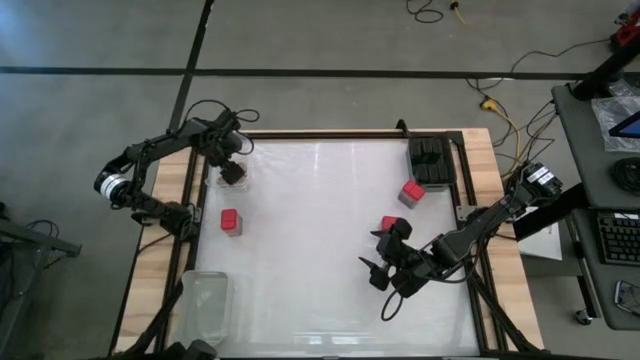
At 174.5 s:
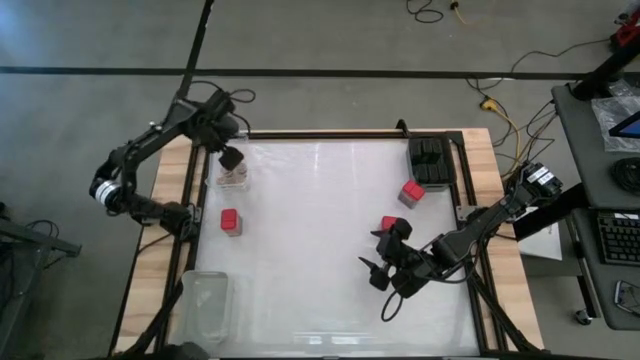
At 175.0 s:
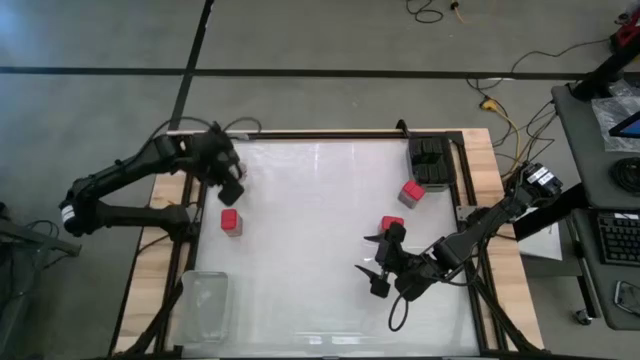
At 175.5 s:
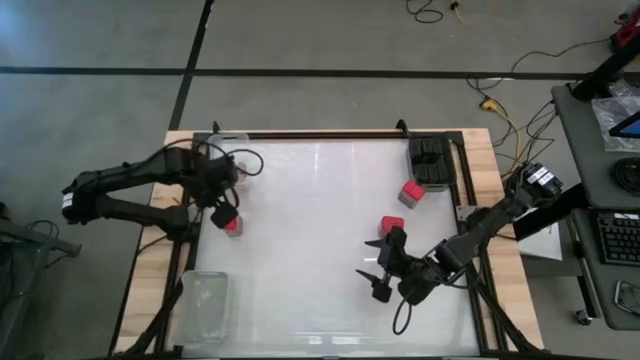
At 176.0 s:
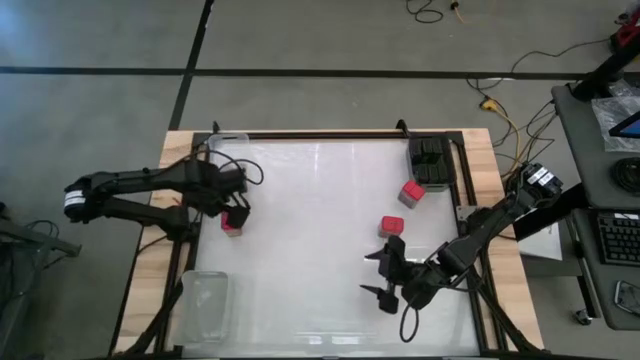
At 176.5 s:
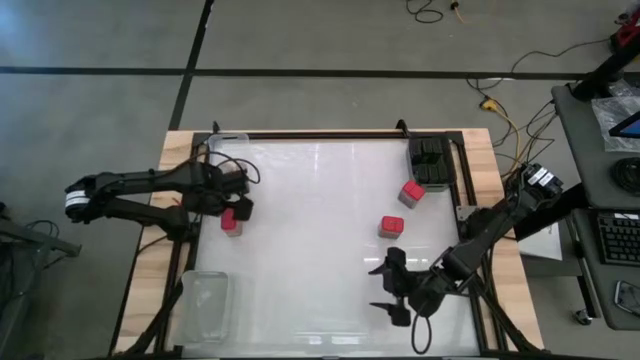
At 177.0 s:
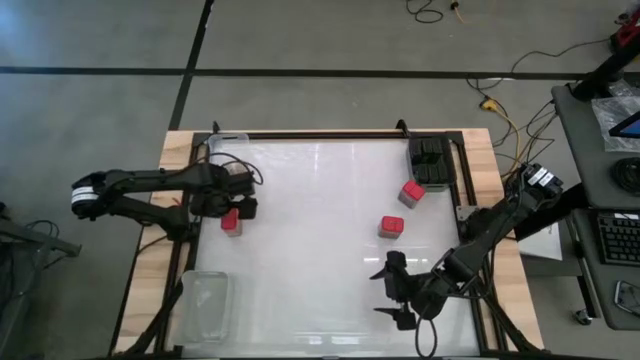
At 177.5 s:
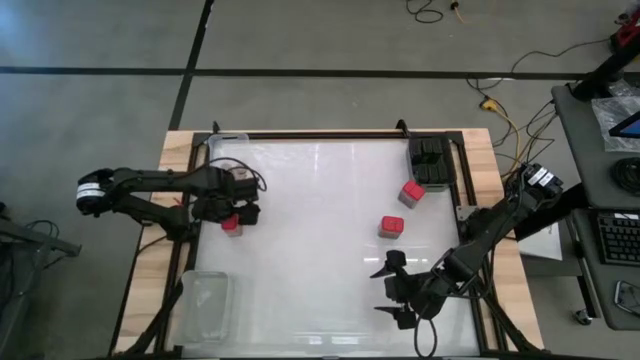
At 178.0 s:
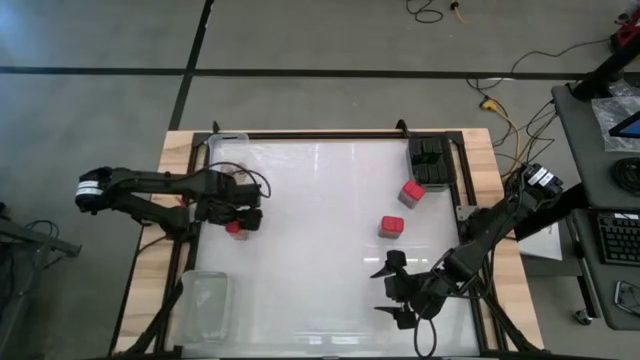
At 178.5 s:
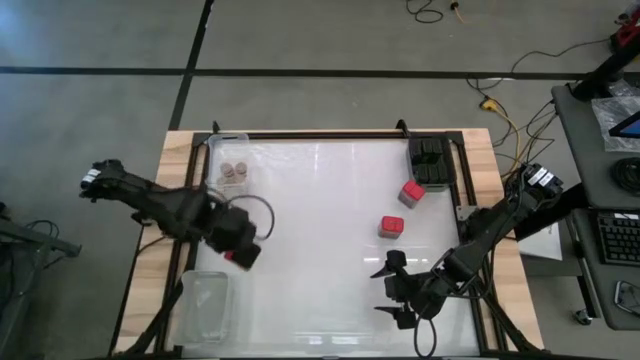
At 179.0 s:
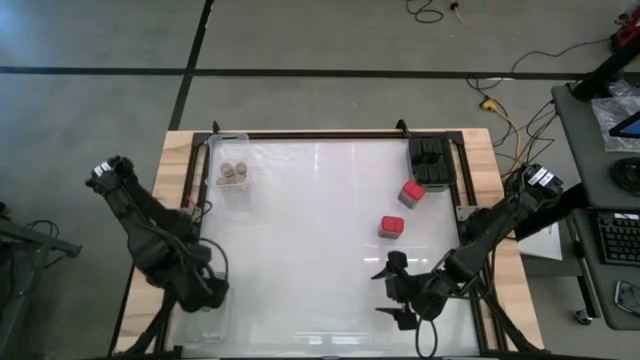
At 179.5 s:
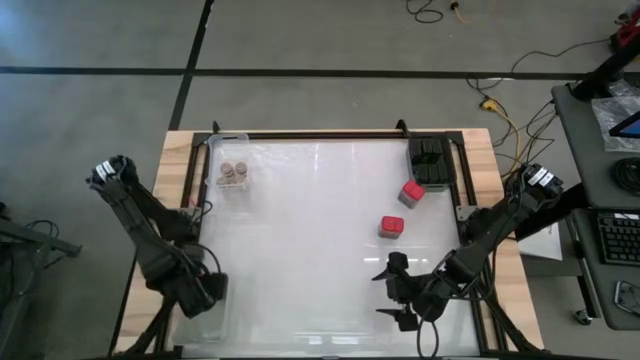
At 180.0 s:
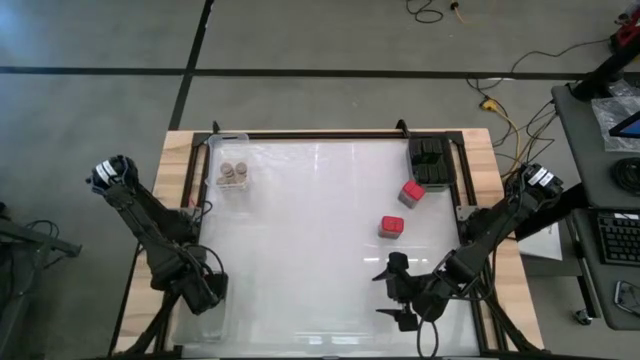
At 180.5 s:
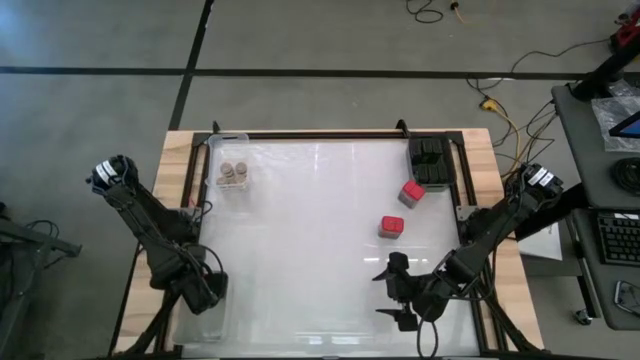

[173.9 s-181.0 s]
Task: Sort spices by type
Put the red seasoning can into the white bin

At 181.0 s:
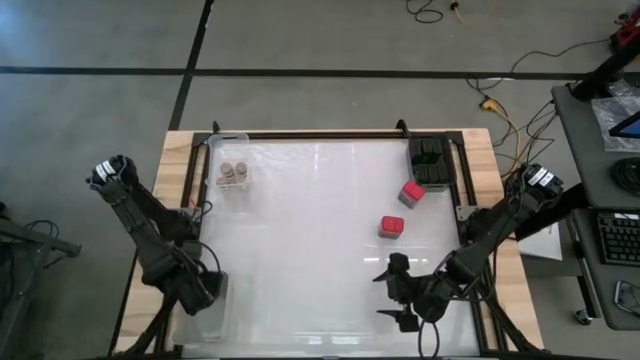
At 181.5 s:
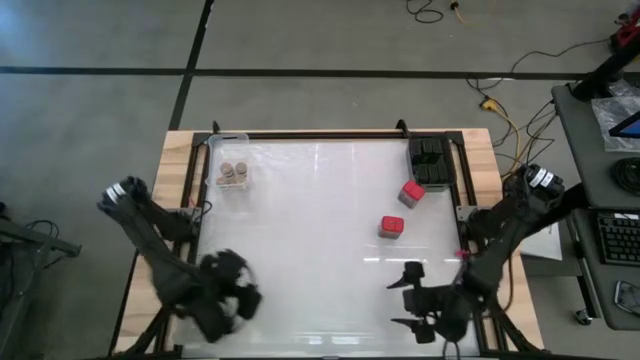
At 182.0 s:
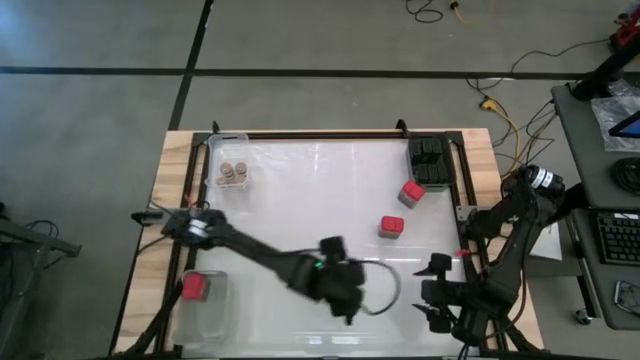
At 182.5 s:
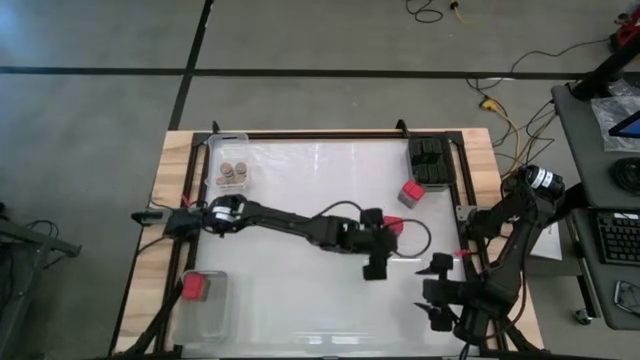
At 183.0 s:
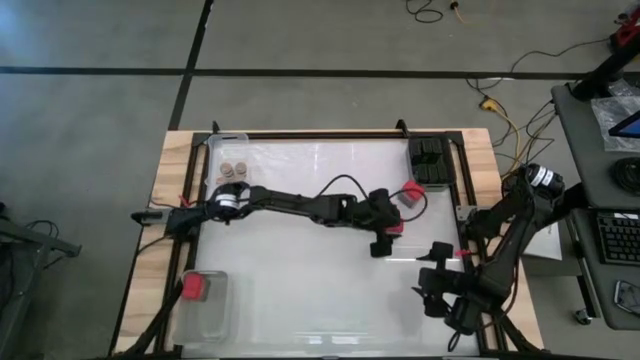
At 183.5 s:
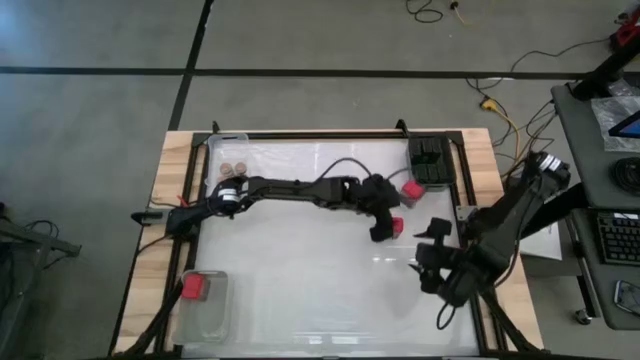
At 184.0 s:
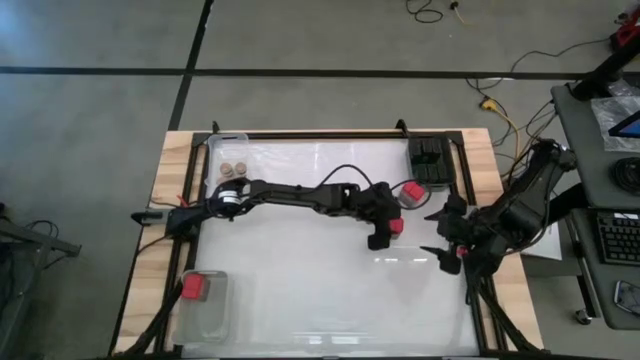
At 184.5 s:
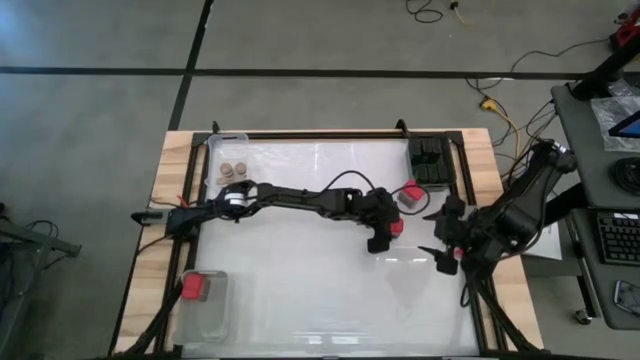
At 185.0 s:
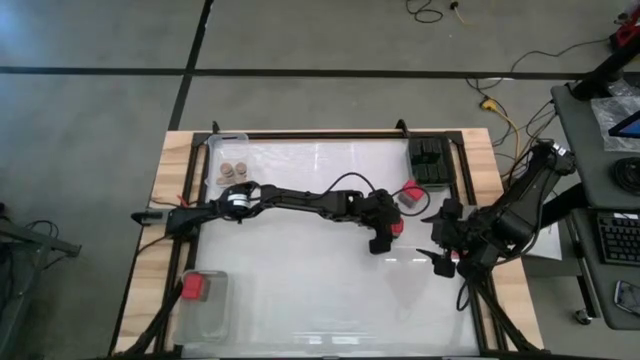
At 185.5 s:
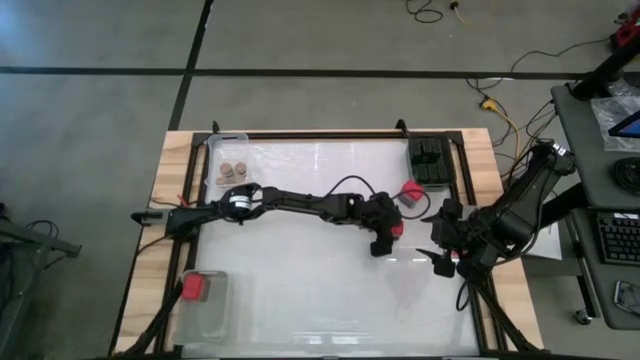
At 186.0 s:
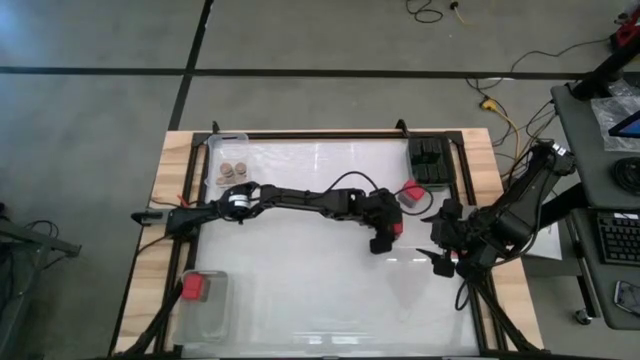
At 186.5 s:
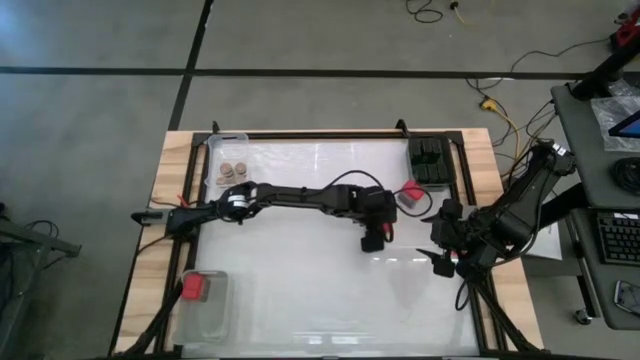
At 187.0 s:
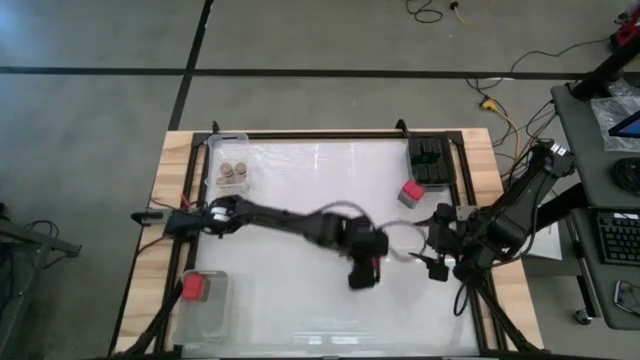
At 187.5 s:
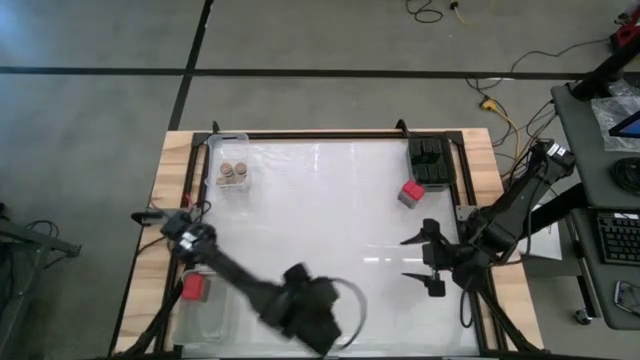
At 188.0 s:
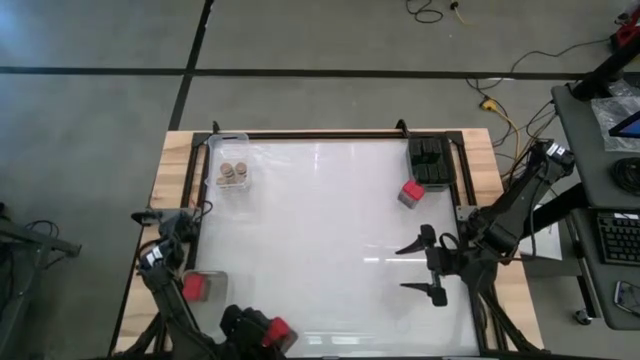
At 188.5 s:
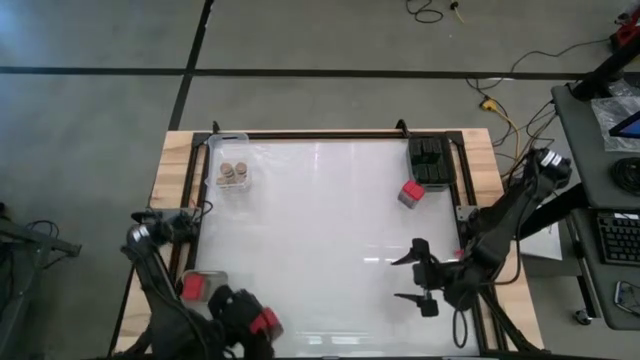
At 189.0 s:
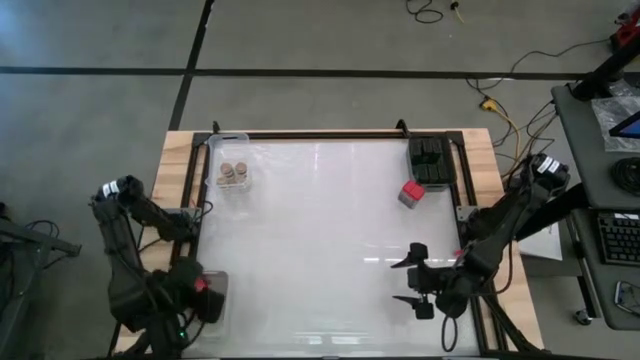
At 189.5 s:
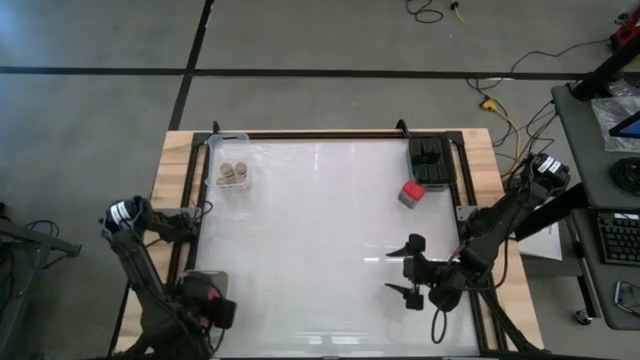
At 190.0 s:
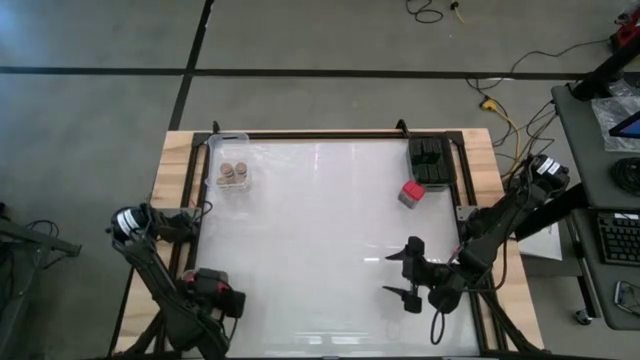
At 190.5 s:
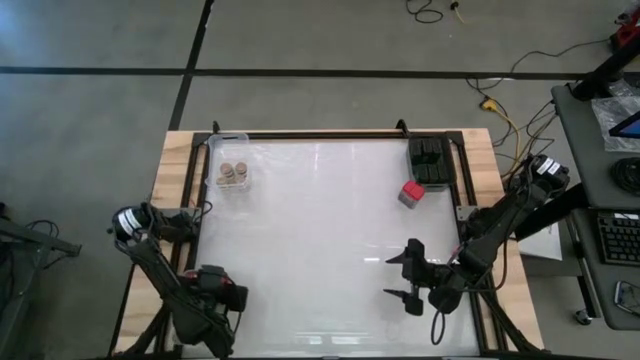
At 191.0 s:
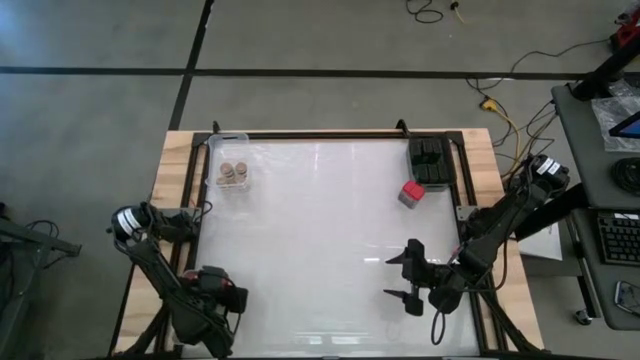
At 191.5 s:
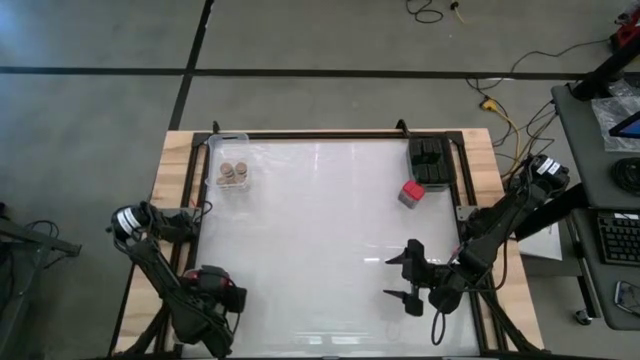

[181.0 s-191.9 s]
Put the red seasoning can into the white bin

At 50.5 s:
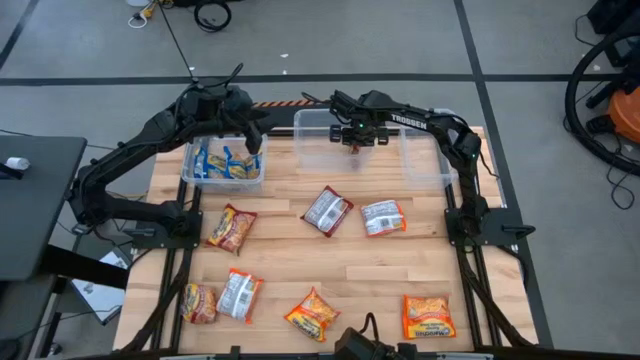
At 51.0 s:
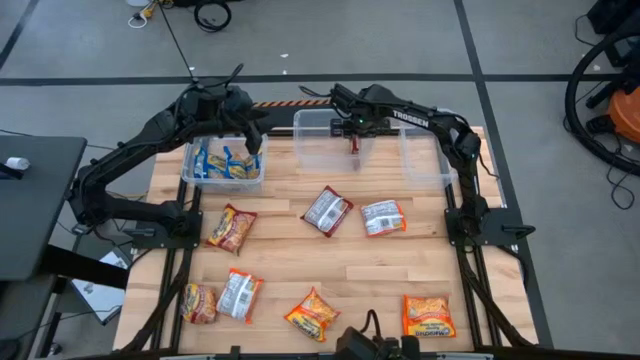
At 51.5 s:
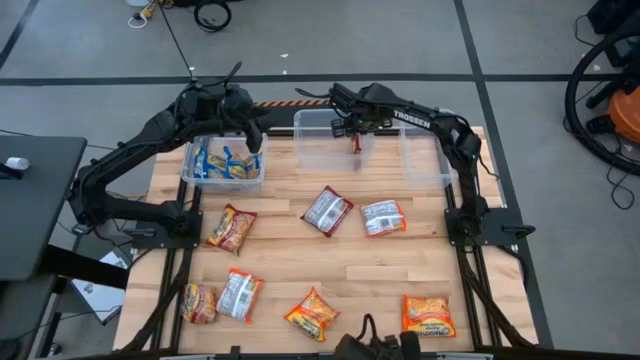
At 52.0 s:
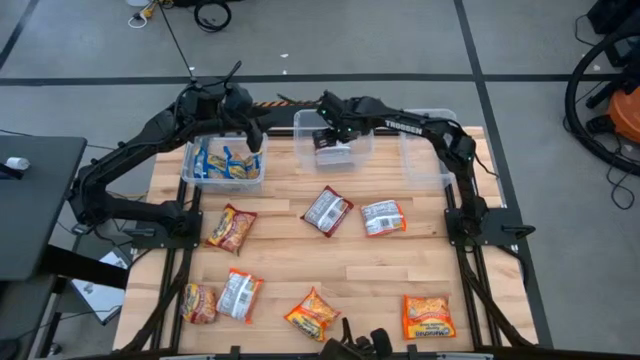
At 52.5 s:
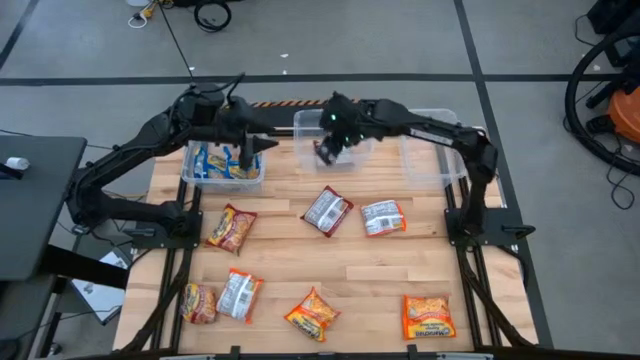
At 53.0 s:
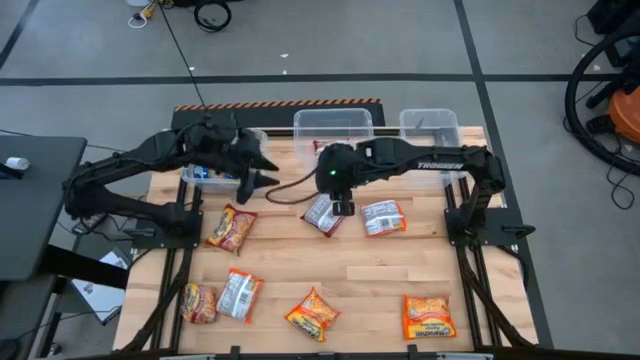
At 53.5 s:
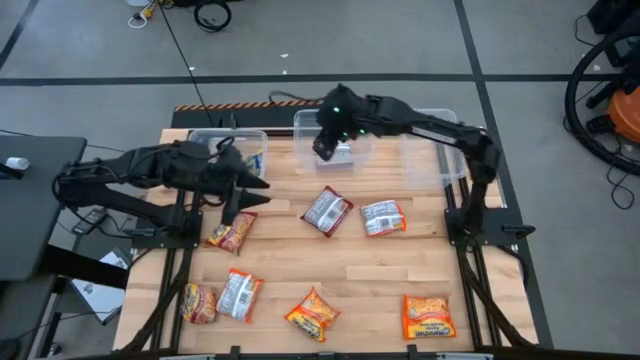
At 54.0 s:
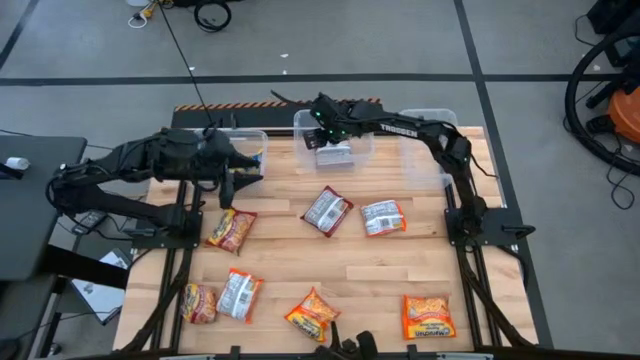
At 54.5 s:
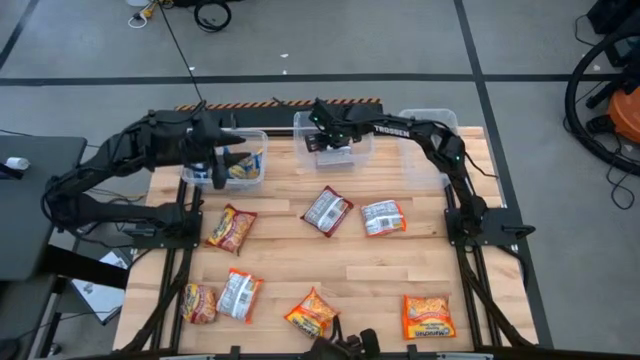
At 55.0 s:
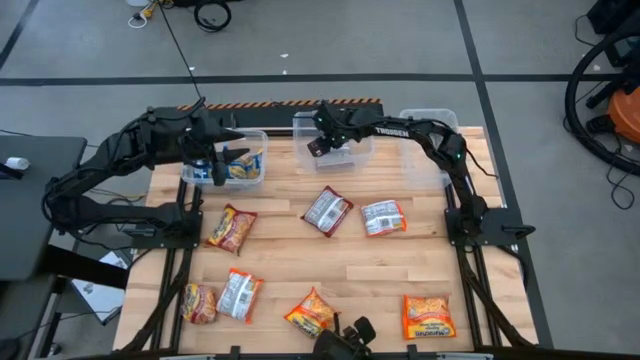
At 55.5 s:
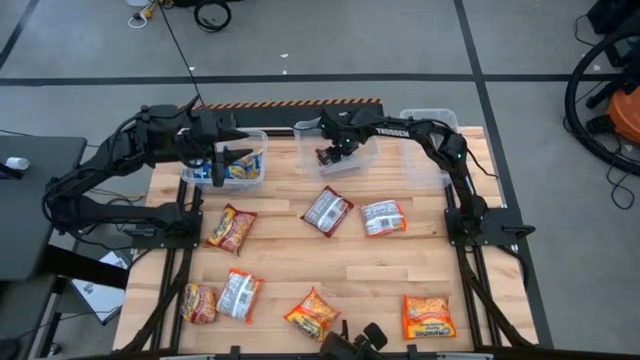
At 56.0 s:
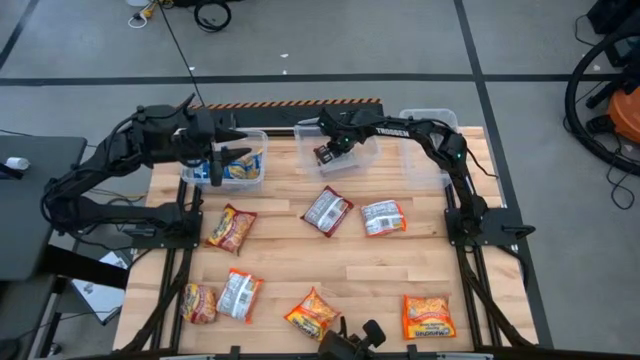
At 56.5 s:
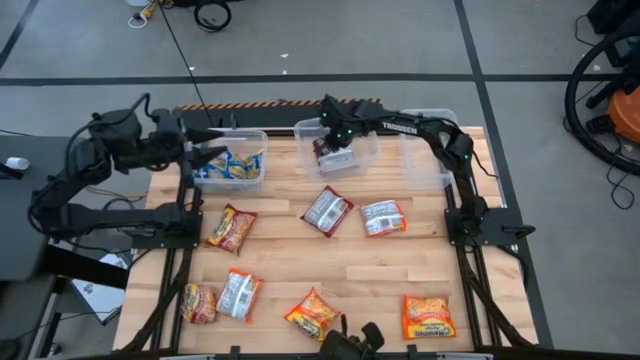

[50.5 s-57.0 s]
Task: Sort Maruchan noodles
Adjust the red noodle in the transparent bin
